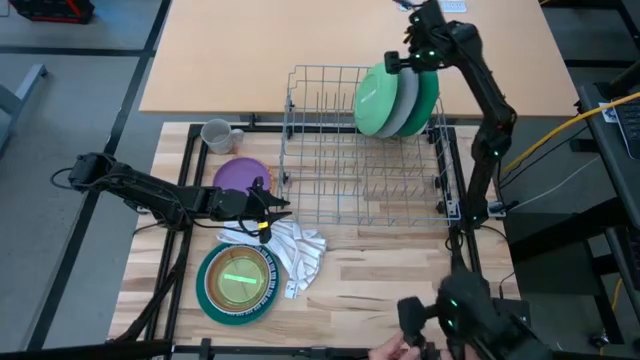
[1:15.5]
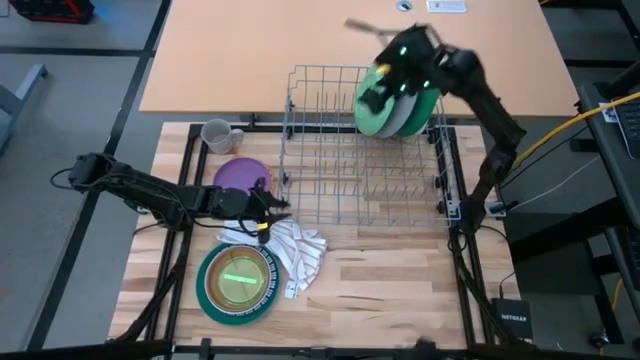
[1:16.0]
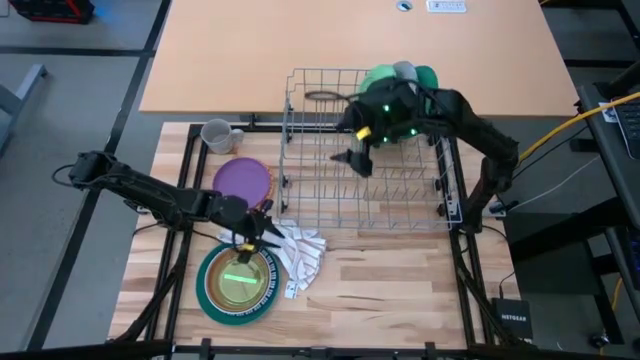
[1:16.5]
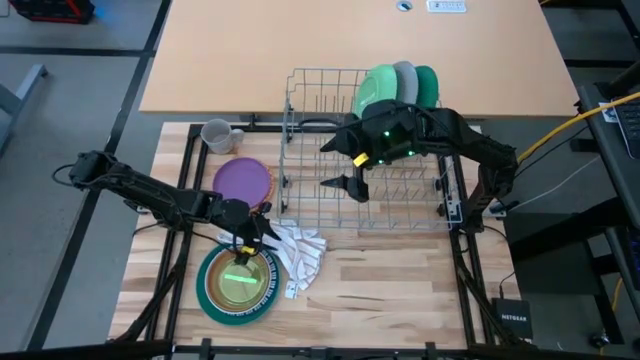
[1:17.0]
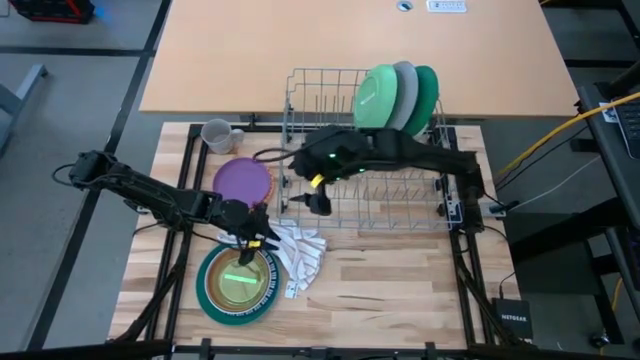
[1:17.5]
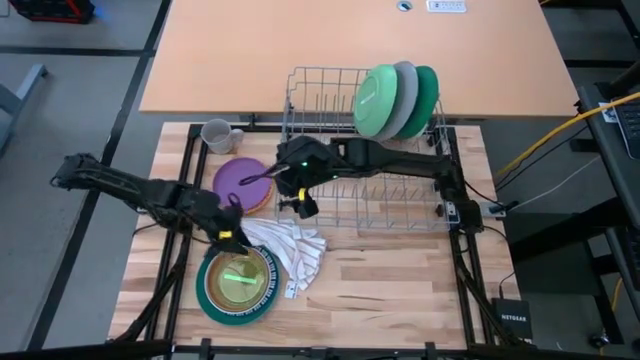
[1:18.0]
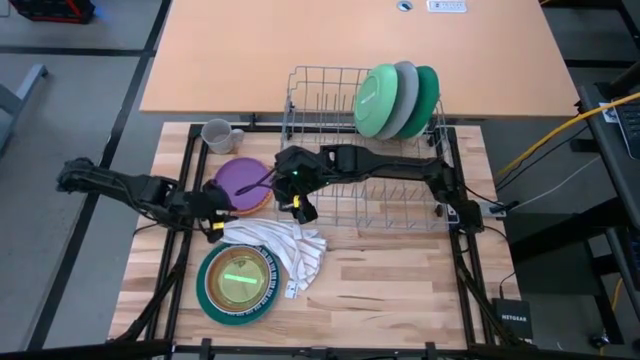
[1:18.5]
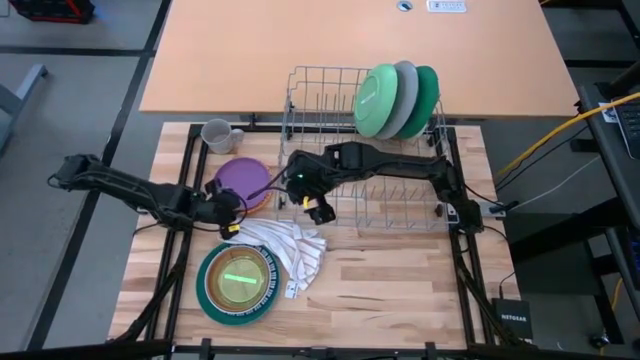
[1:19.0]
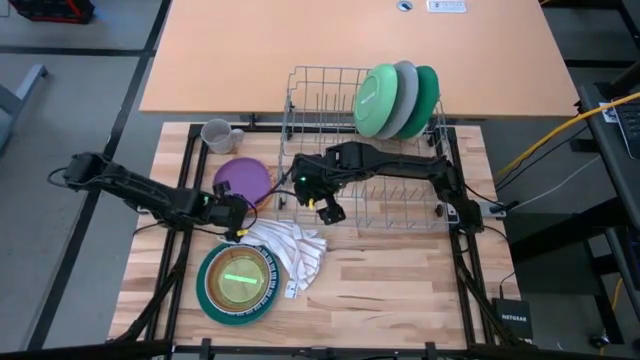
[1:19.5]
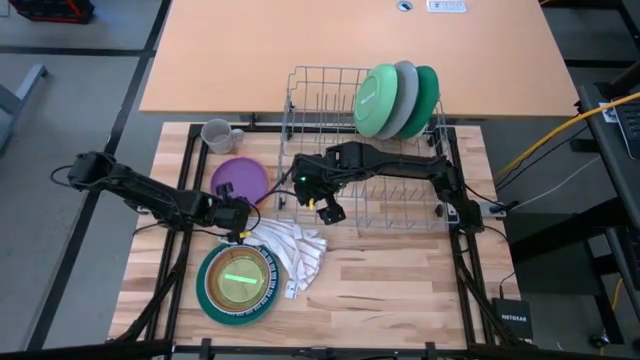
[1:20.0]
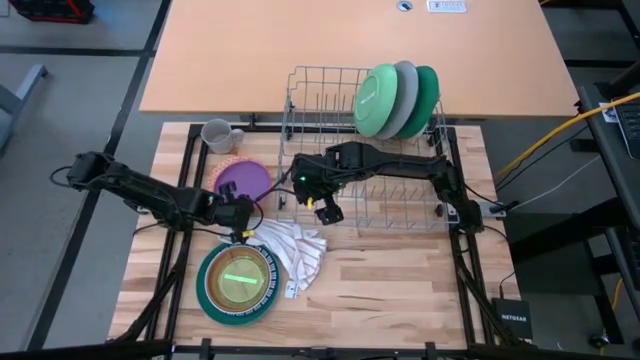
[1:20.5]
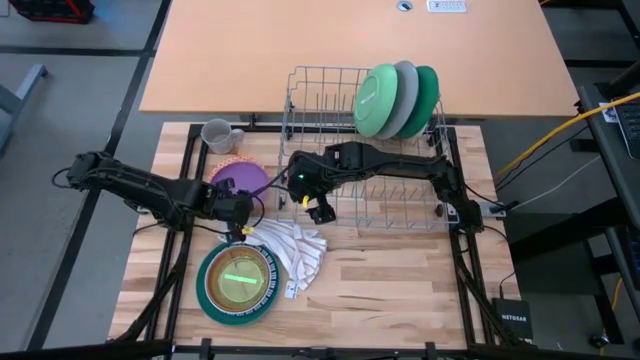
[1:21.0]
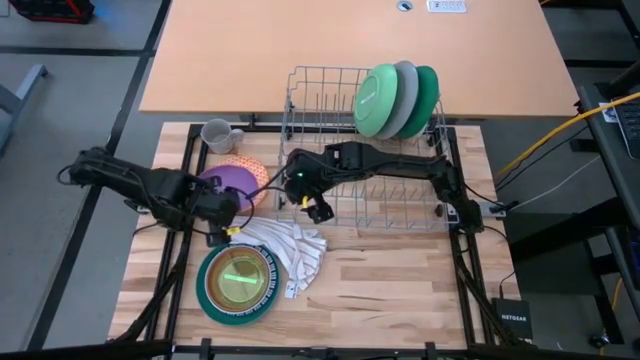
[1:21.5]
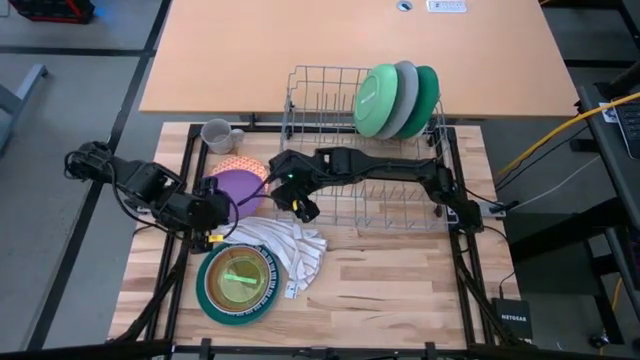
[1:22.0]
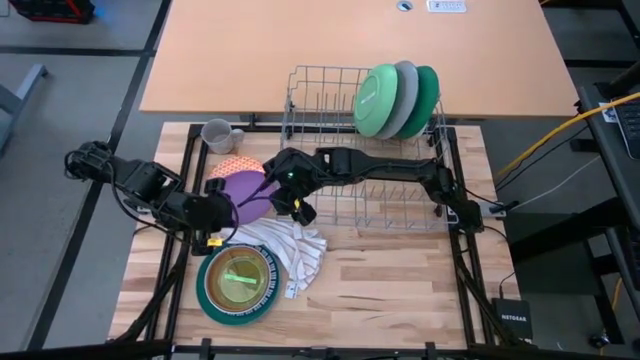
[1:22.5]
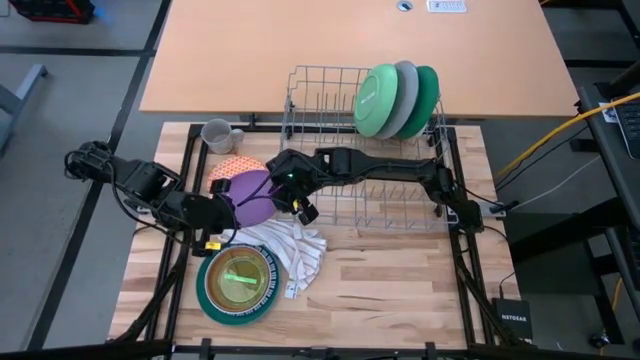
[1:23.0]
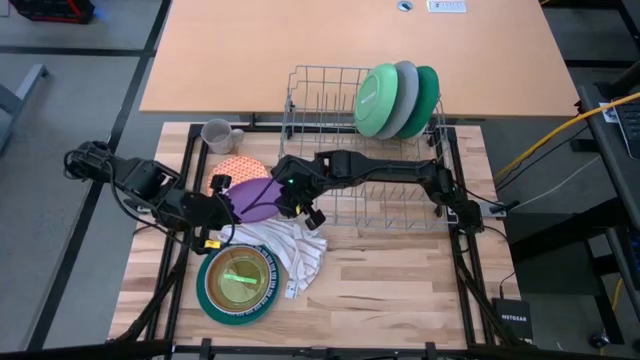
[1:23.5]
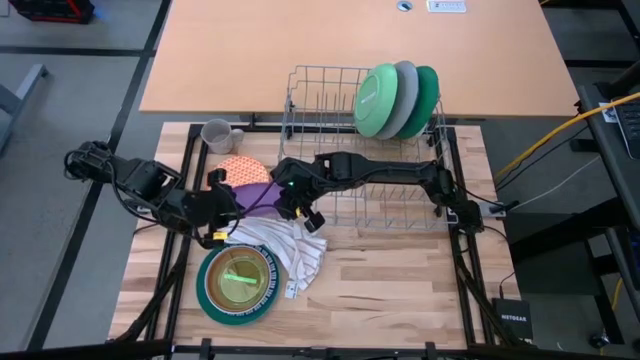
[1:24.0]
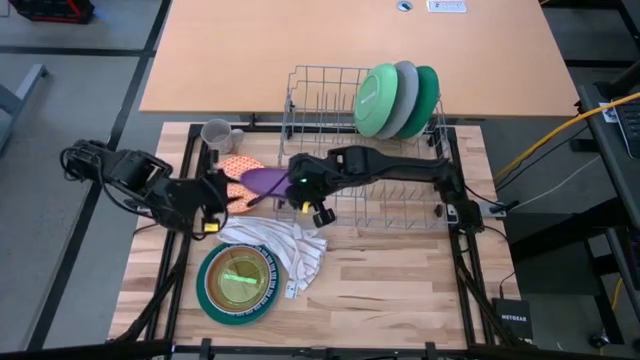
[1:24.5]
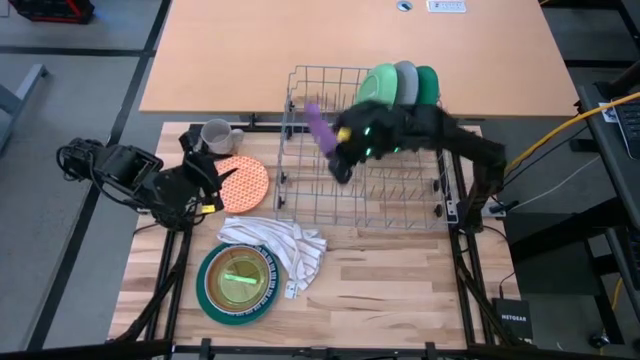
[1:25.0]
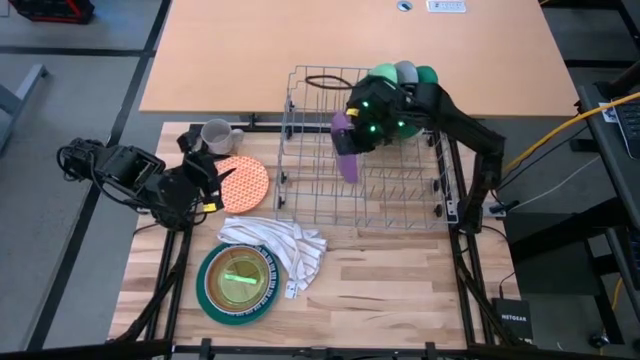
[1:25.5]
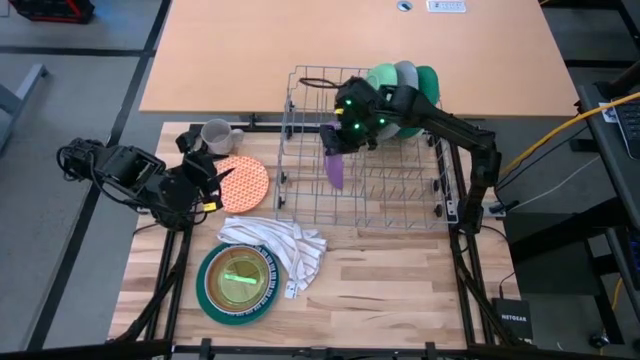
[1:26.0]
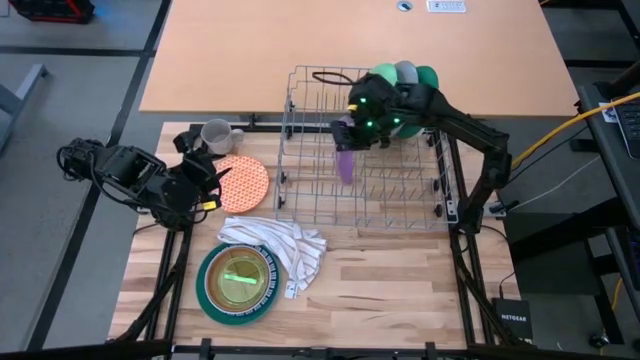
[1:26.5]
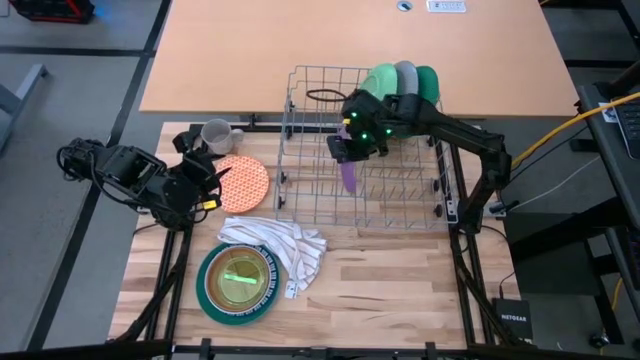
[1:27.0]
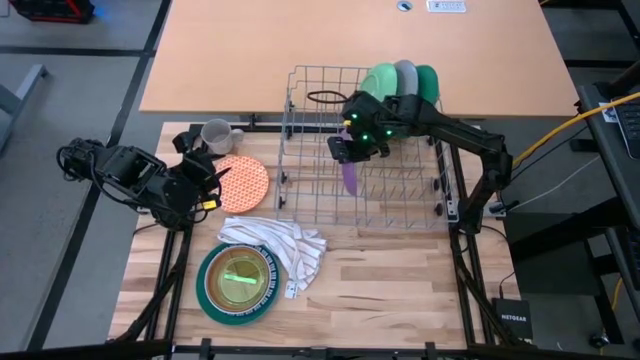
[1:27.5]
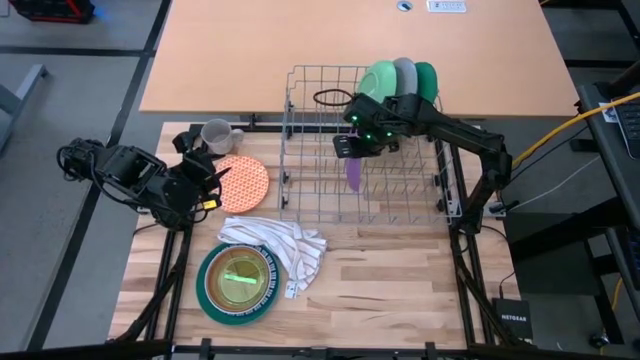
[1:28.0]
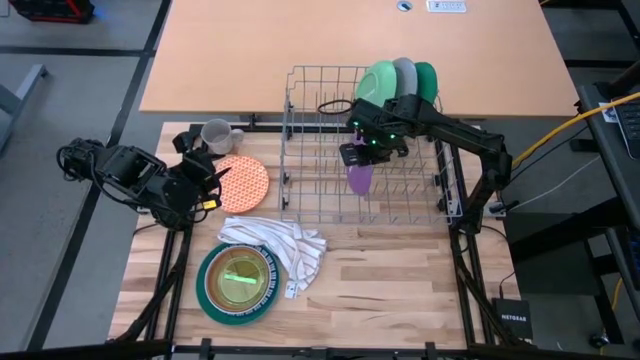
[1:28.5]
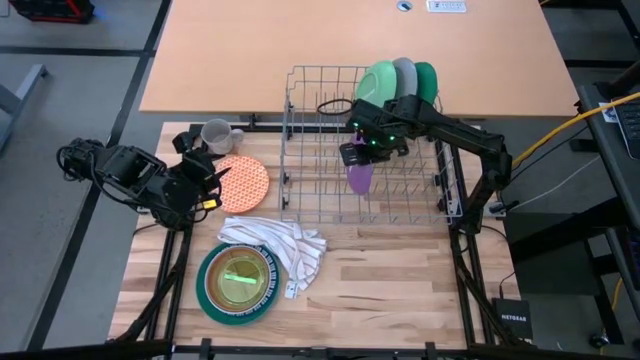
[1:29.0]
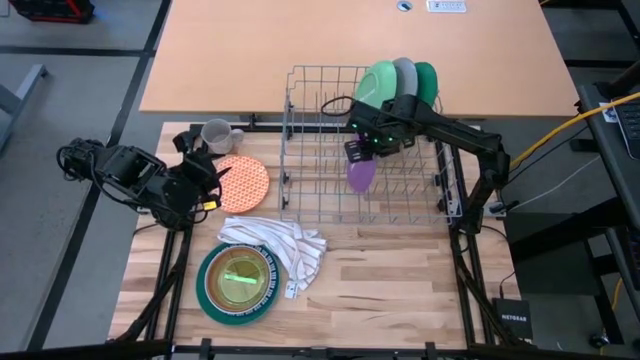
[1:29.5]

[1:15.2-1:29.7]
Task: Sort dishes
Put the purple plate into the dish rack

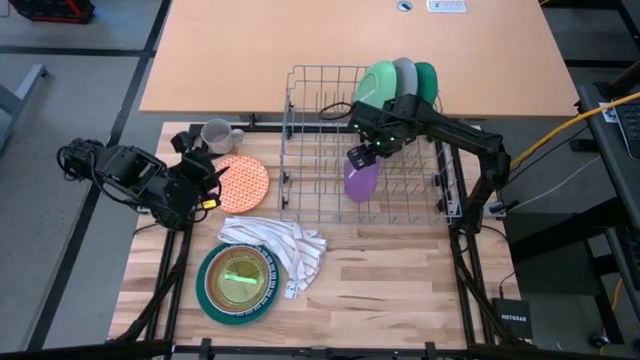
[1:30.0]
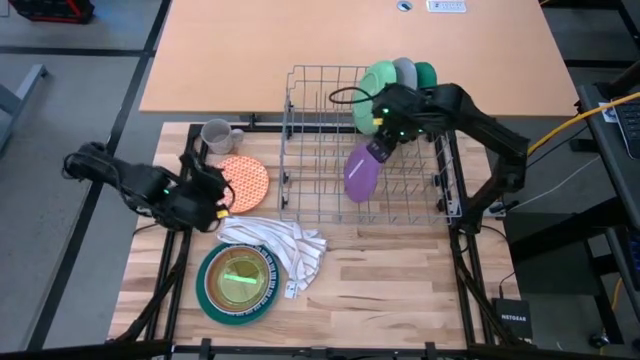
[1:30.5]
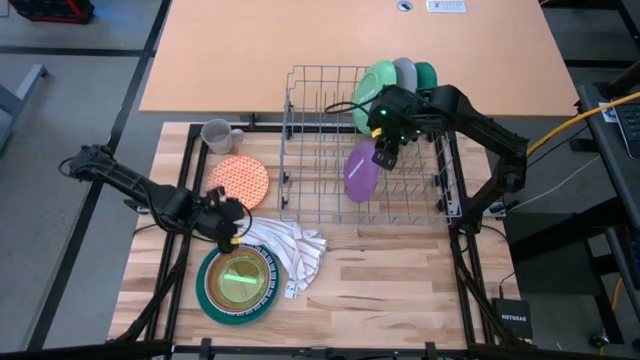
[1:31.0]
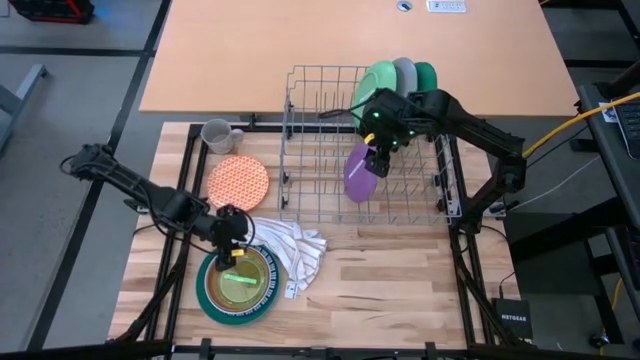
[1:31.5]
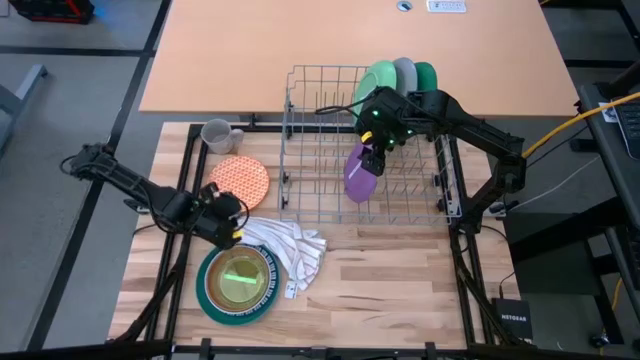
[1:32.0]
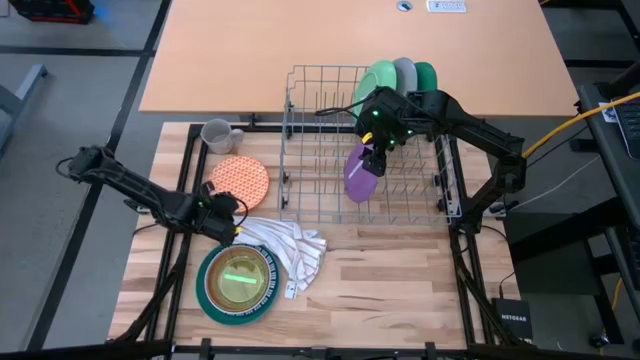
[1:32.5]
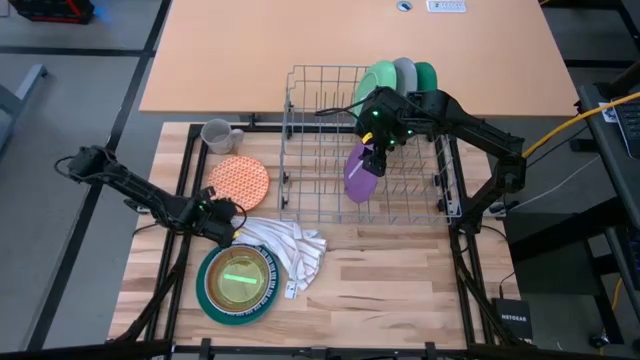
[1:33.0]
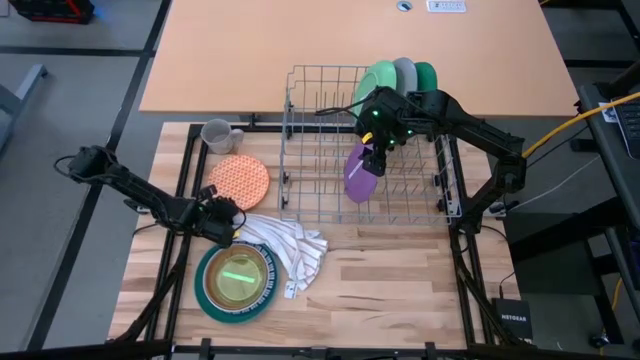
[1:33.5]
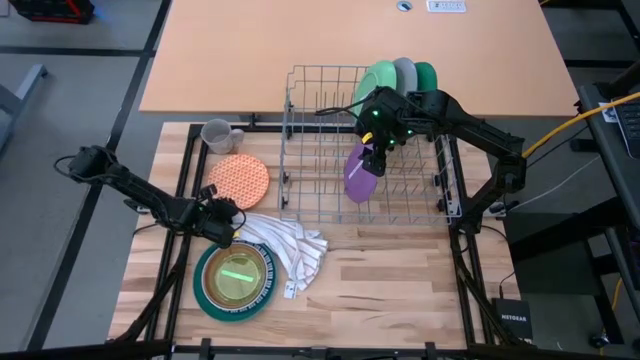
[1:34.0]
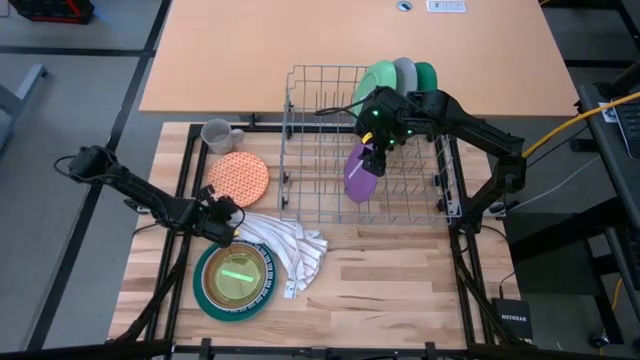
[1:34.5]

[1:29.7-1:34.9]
Put the orange patterned plate into the dish rack

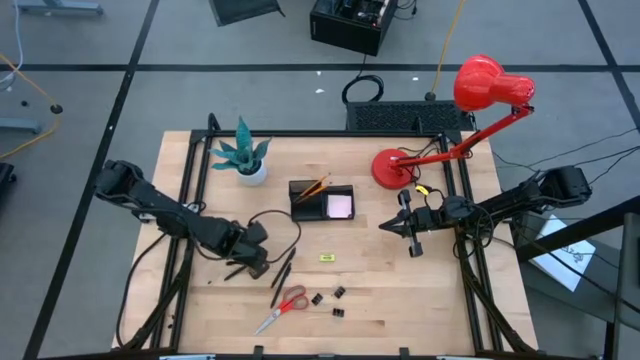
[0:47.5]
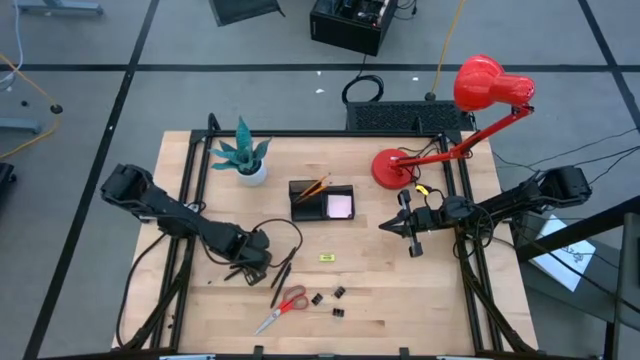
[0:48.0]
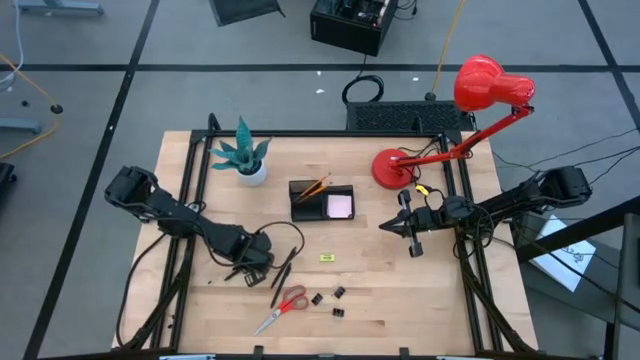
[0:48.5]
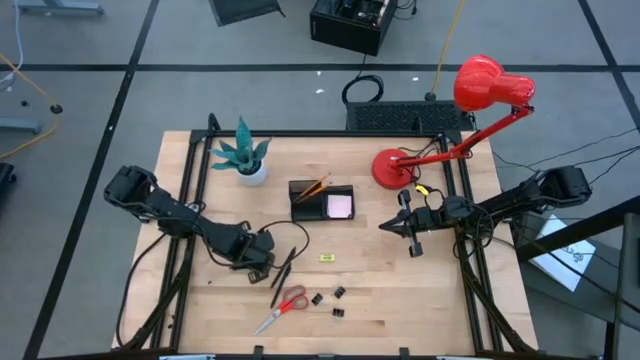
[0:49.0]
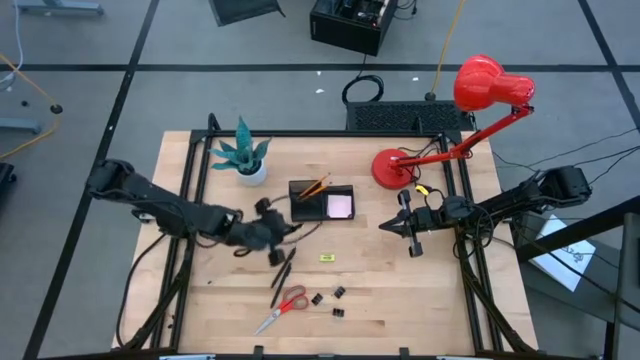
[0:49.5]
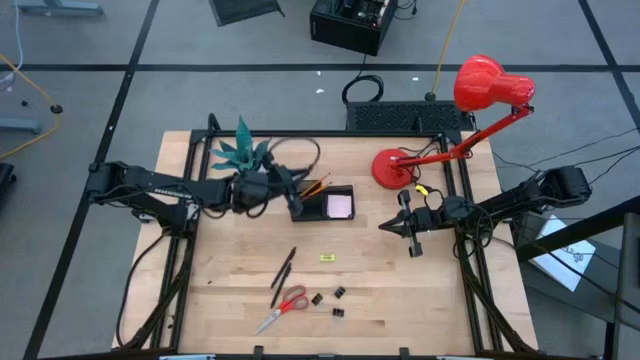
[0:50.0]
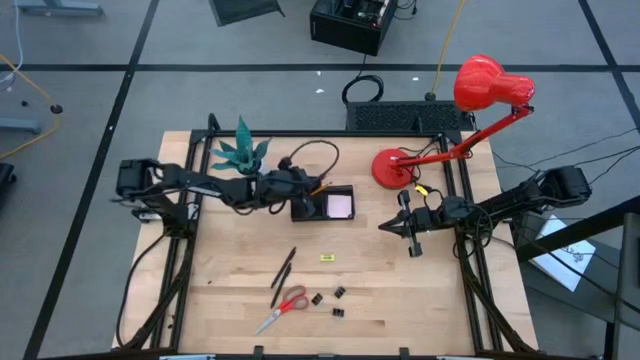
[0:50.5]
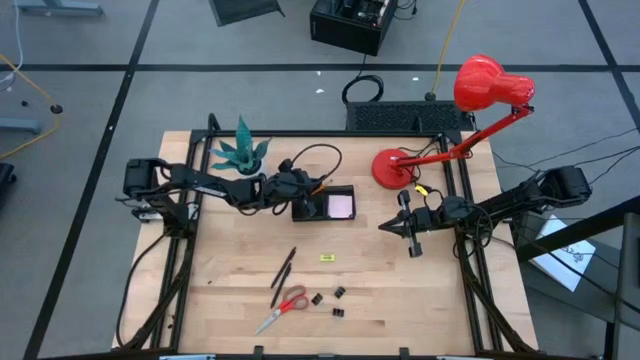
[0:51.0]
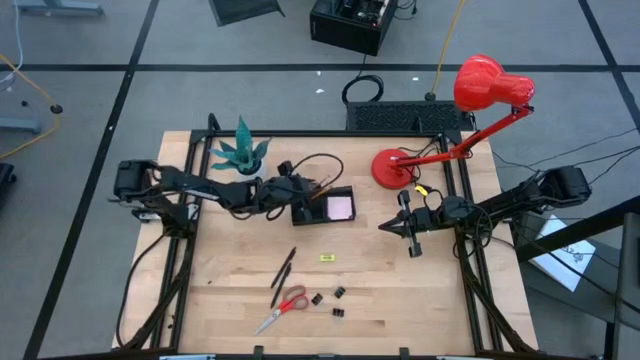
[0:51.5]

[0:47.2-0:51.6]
Task: Pick and place office supplies into organizer
Put the black pen into the black desk organizer
